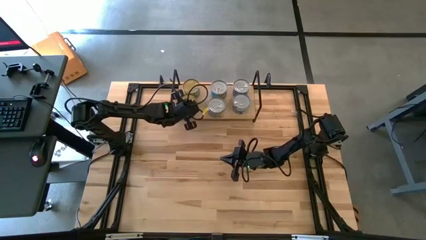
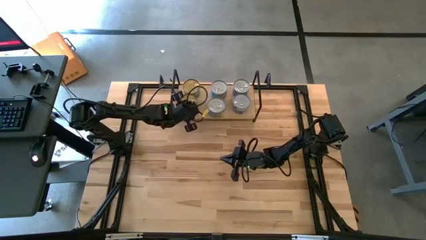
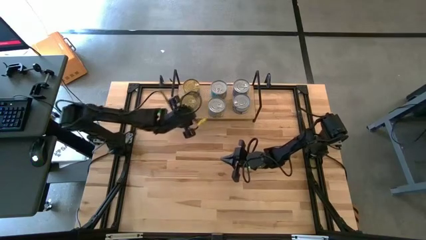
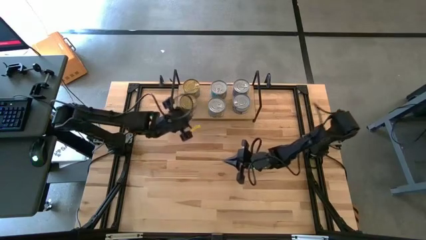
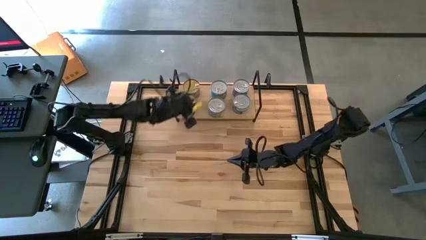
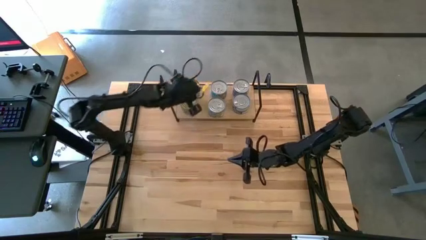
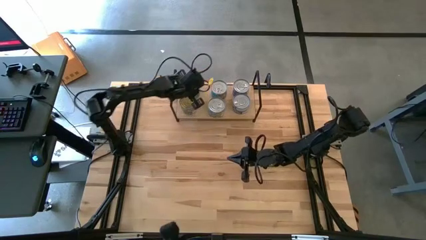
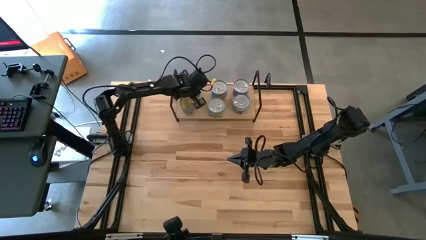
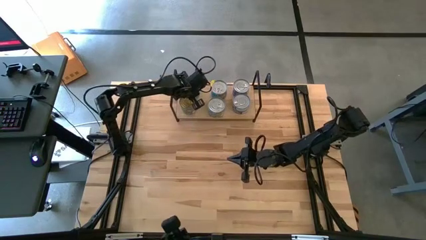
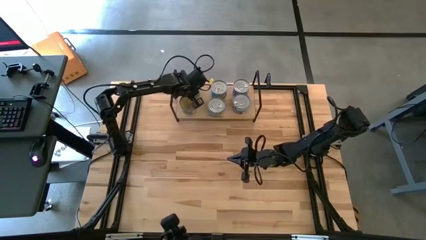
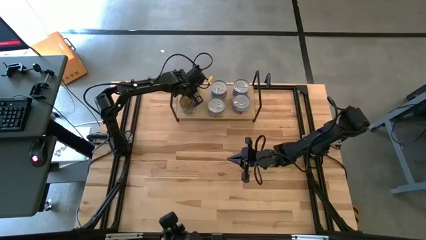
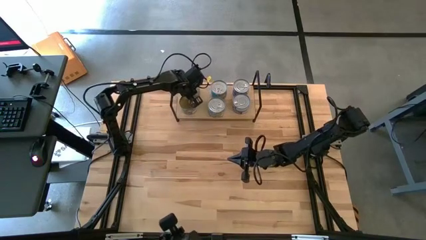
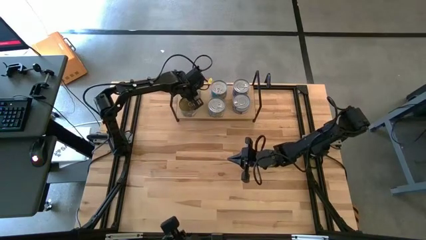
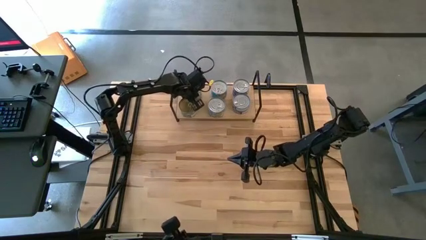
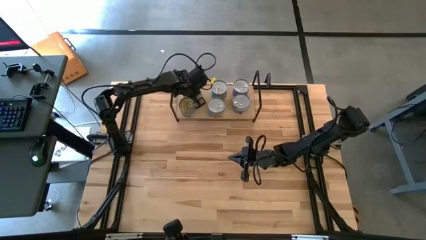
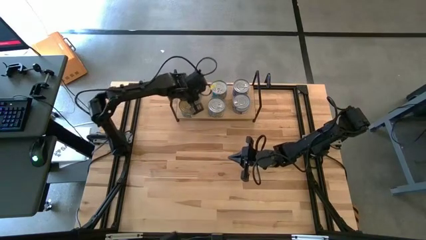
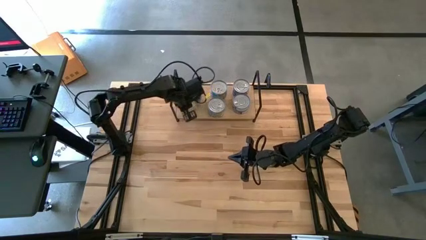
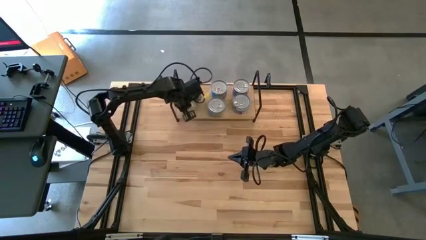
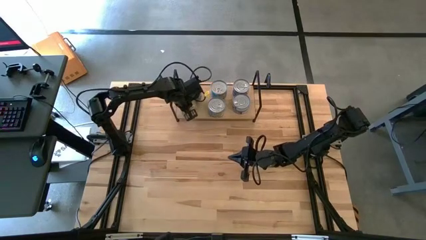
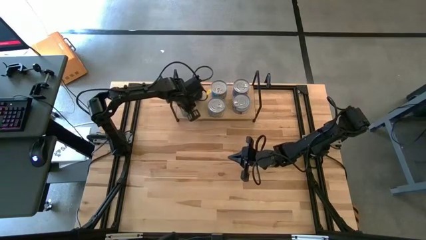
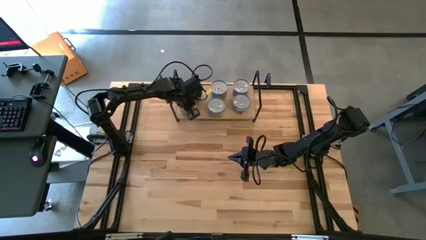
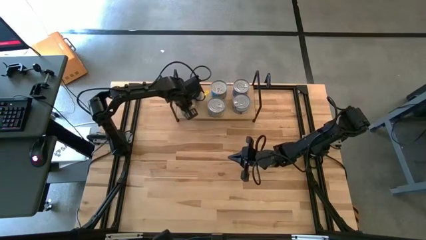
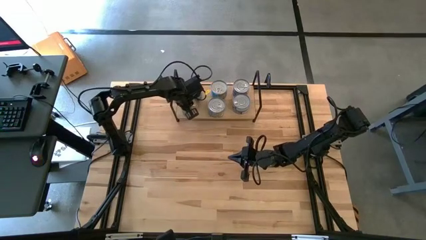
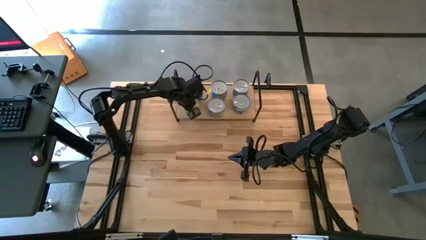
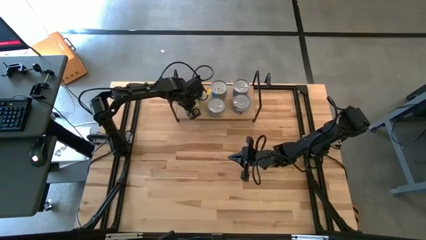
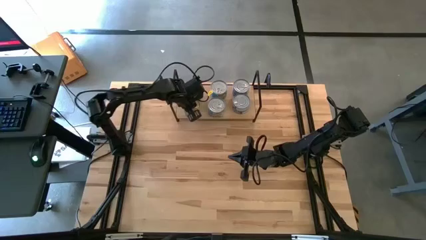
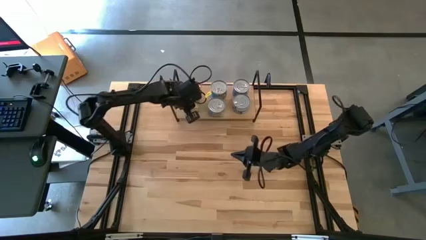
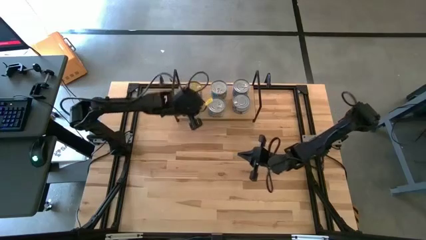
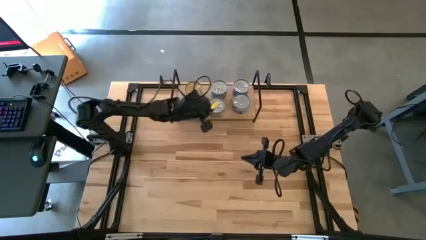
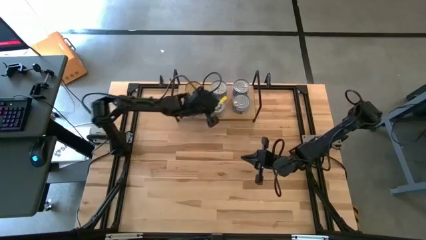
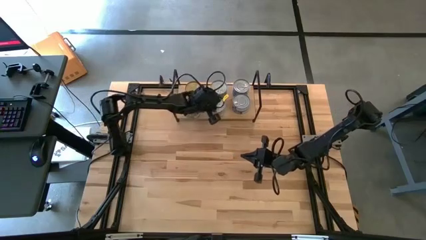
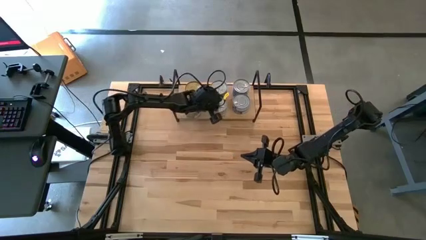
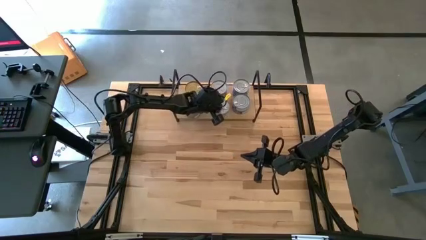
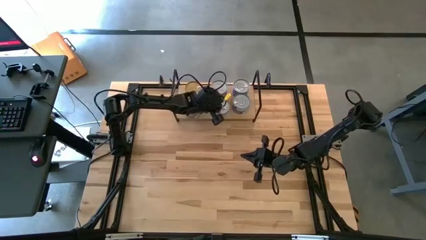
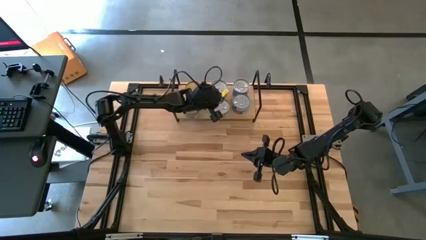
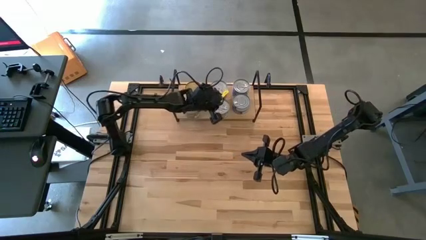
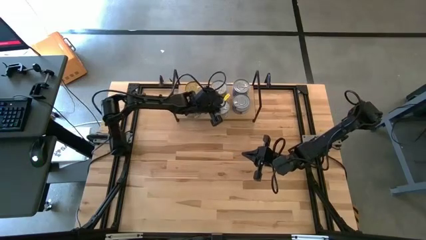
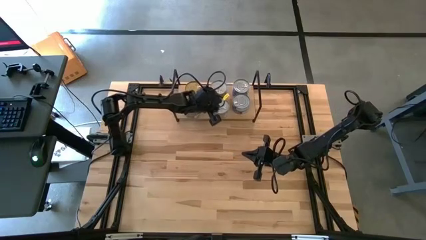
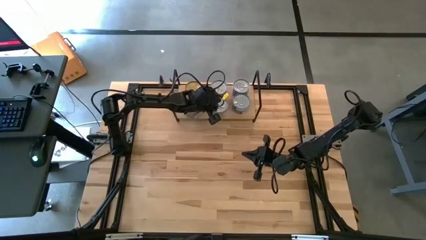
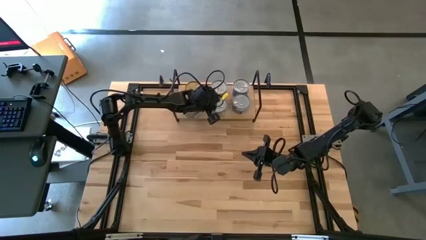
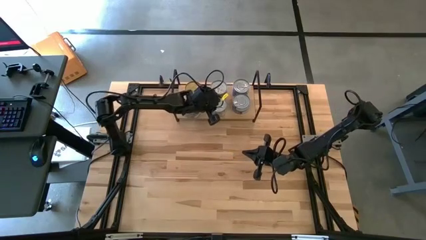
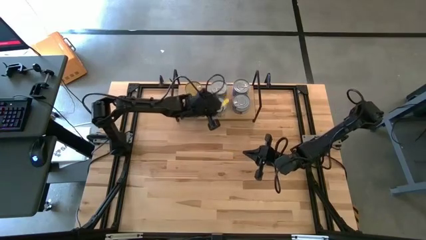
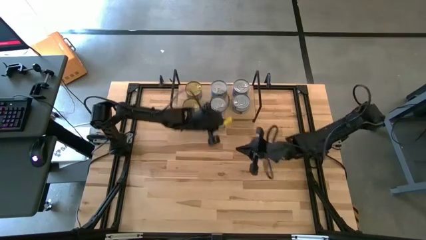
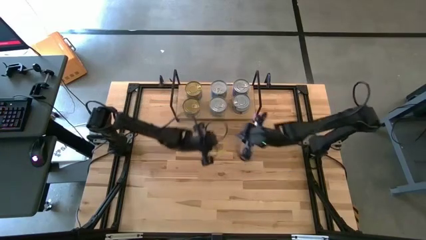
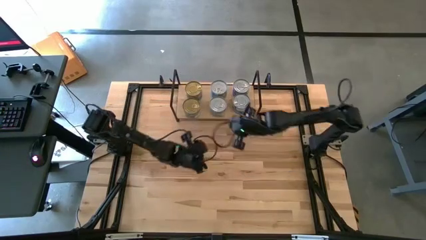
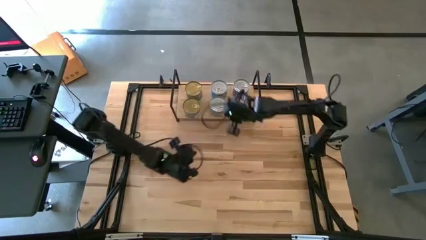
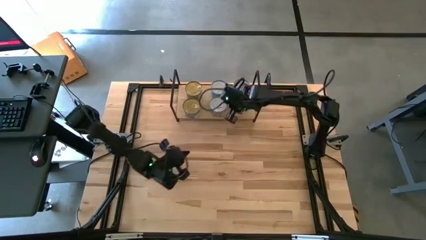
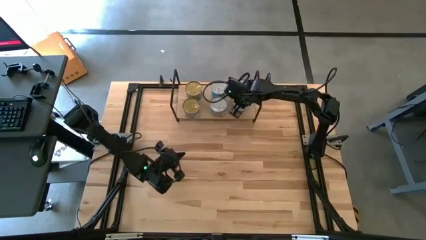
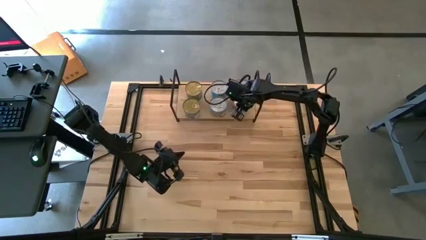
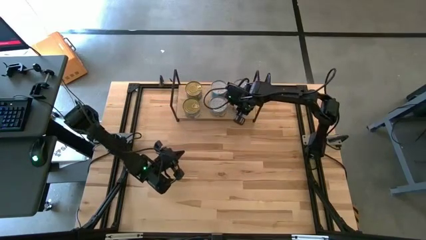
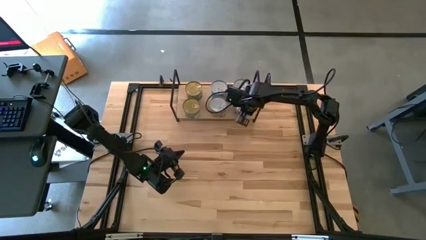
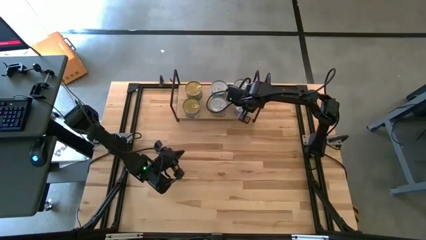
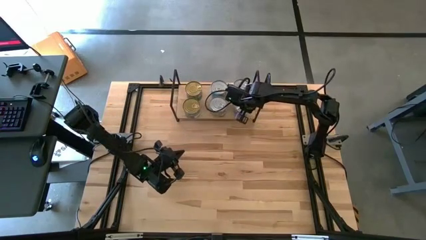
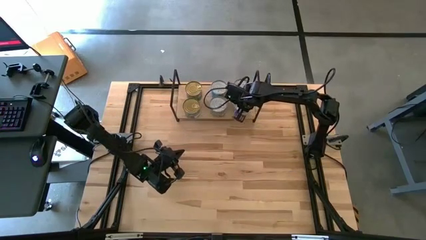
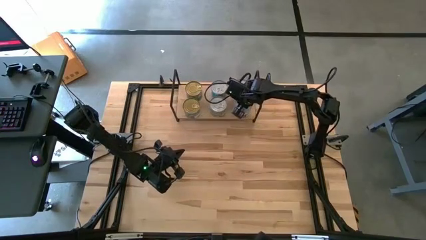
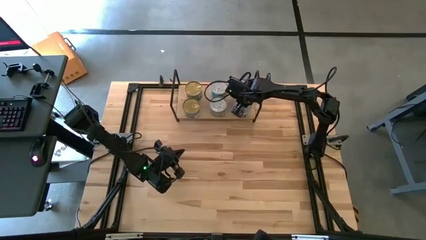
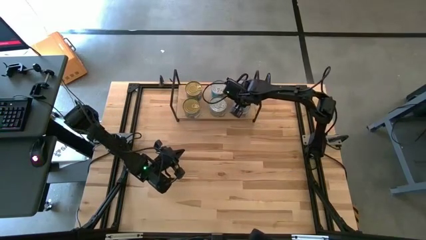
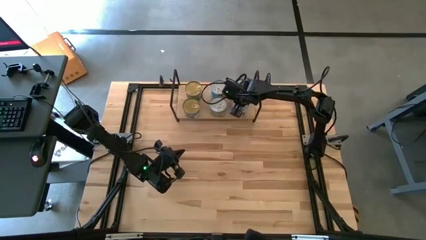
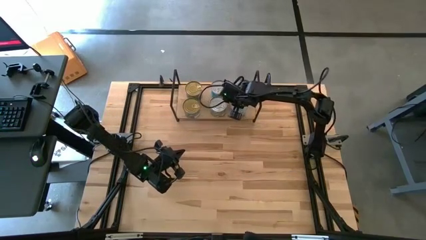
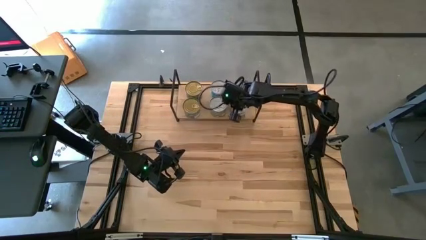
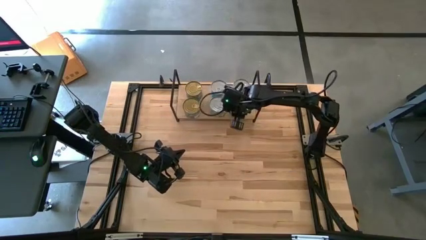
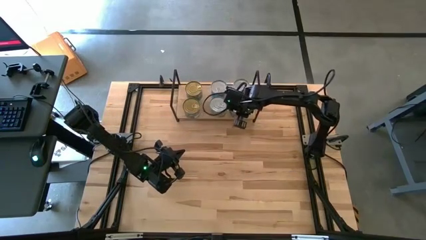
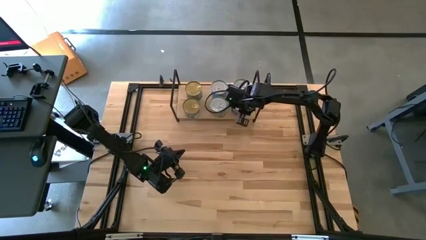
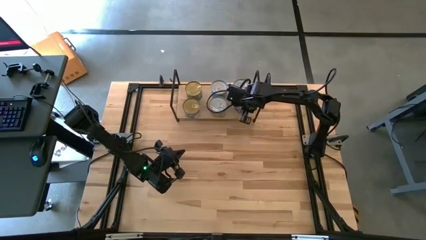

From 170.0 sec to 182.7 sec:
Task: Stack canned seafood by type on shelf
Adjust the stacked colored tuna cans on the shelf

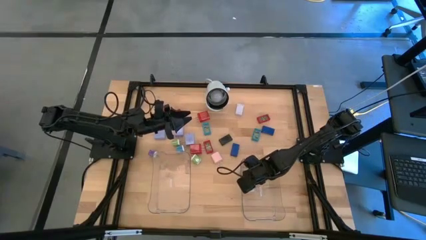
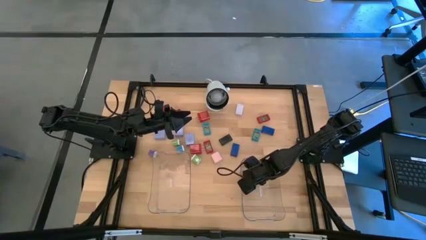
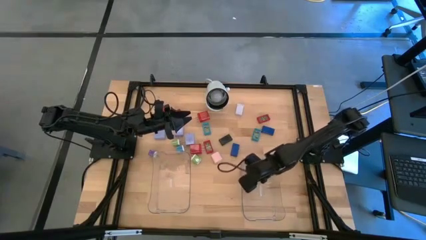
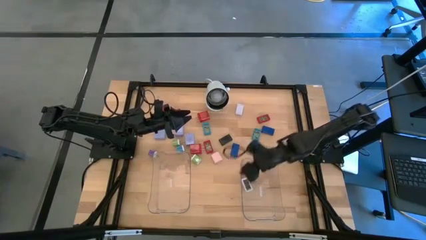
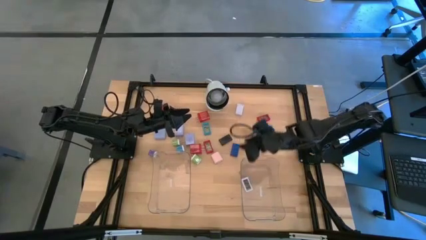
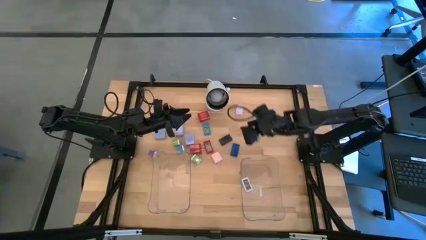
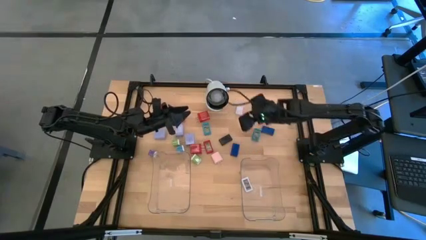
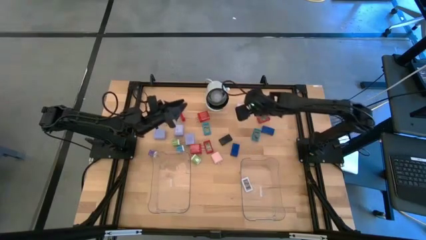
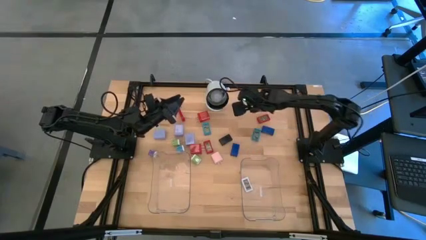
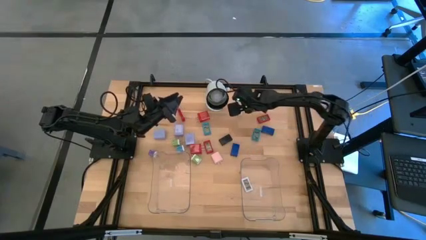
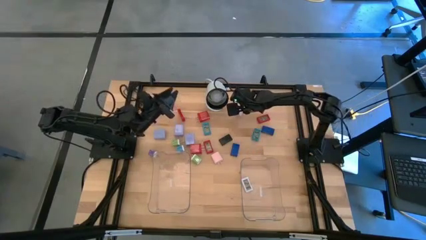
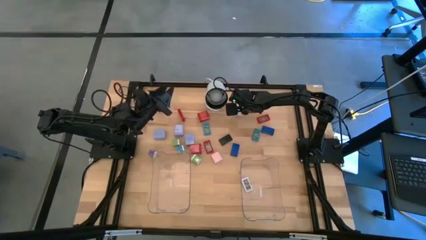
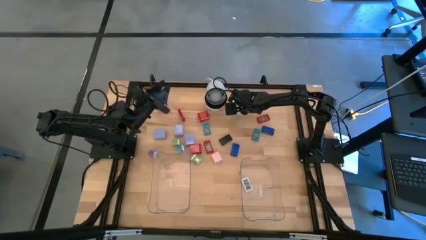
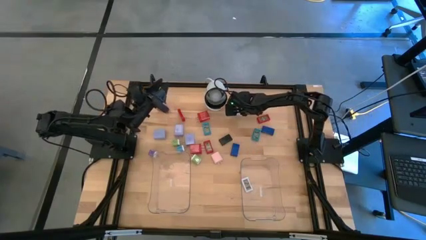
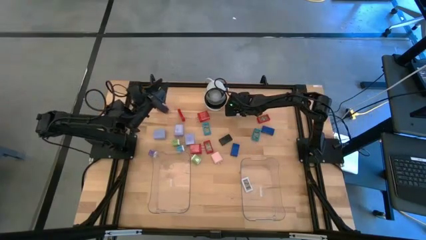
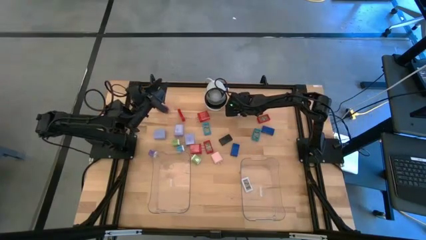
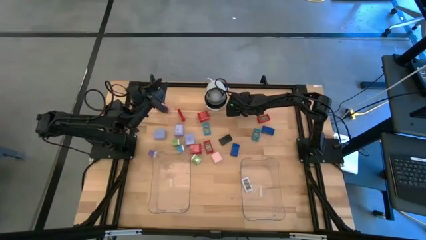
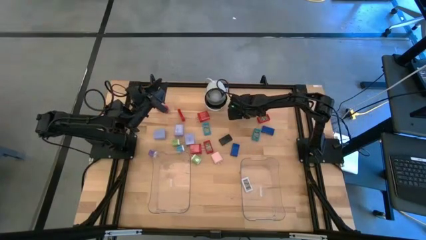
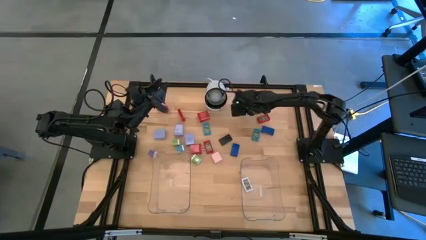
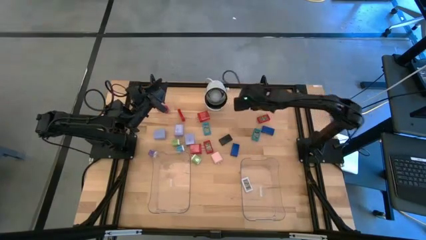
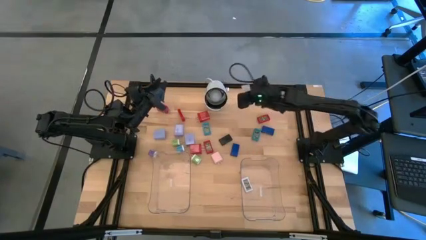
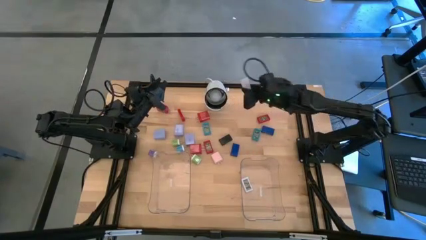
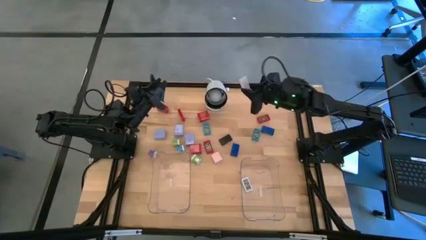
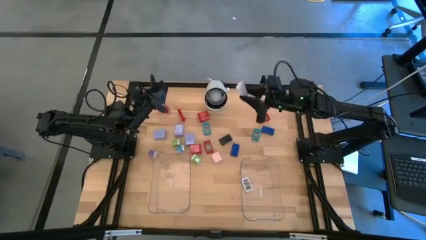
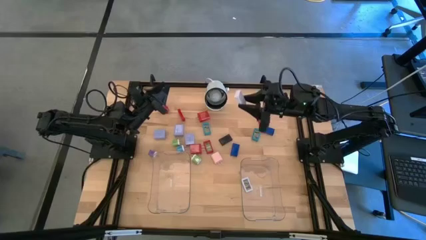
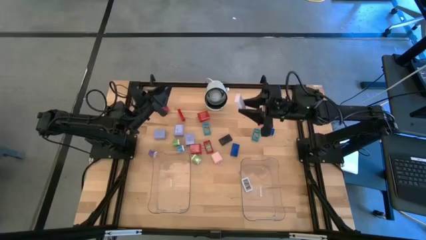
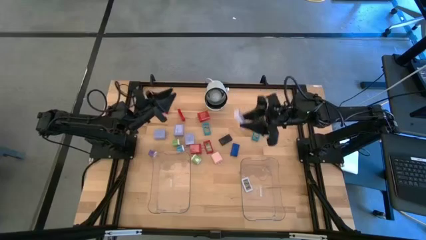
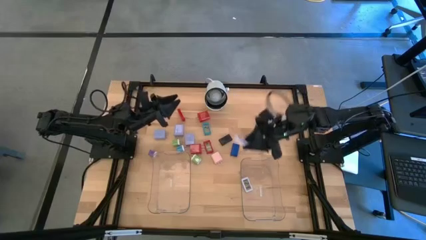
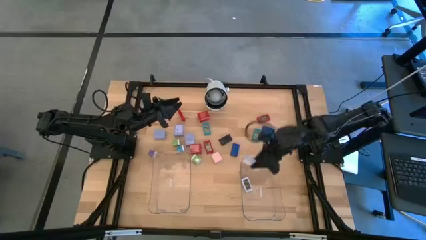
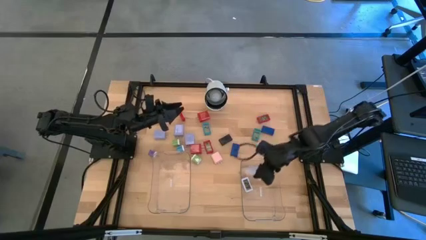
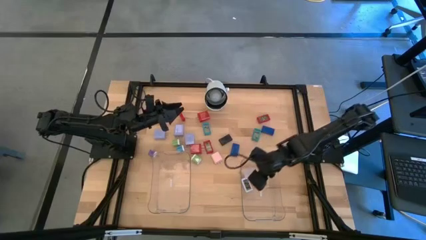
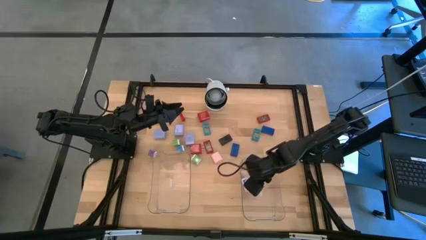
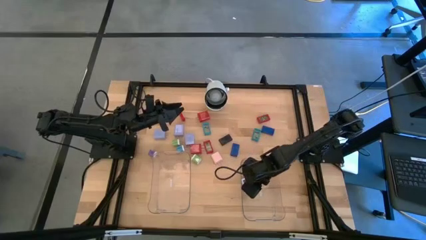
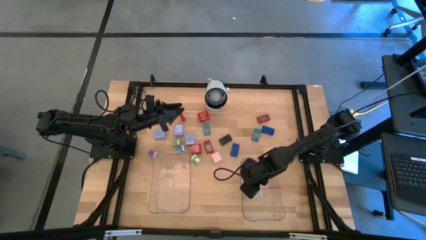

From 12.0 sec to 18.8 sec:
Task: Pick & Place Office items
Put the white timer into the right transparent bin
